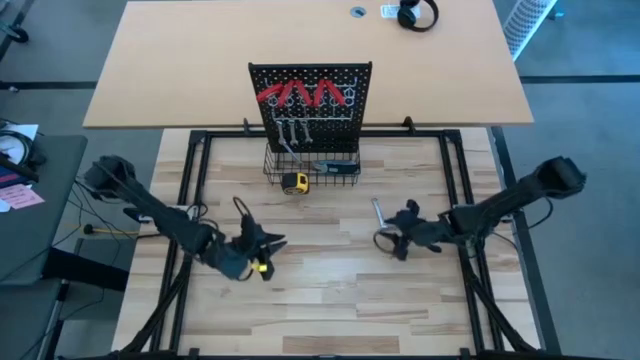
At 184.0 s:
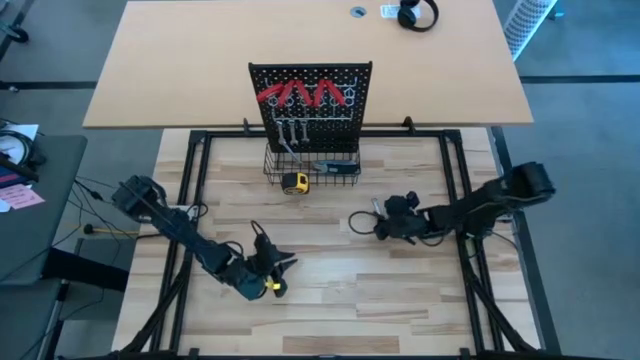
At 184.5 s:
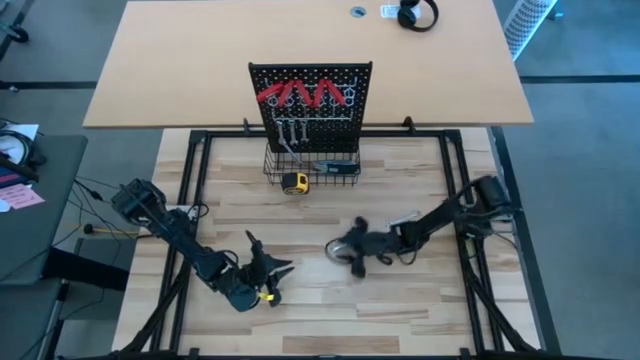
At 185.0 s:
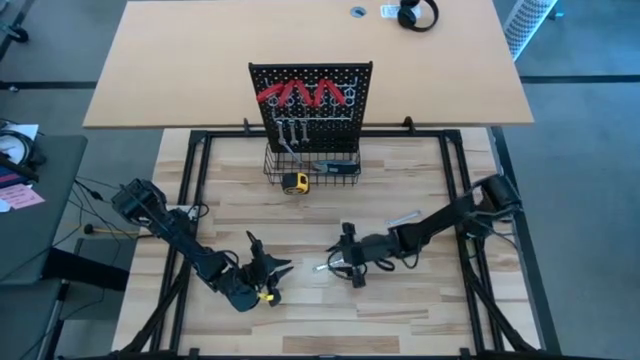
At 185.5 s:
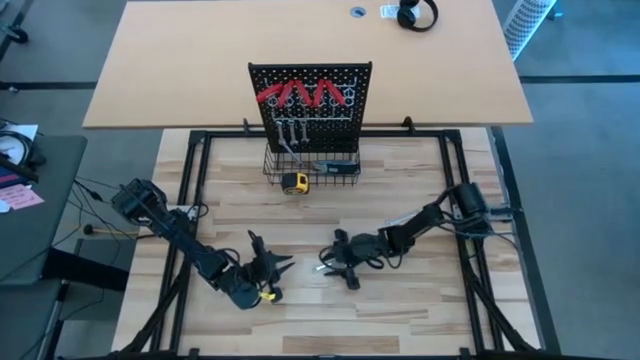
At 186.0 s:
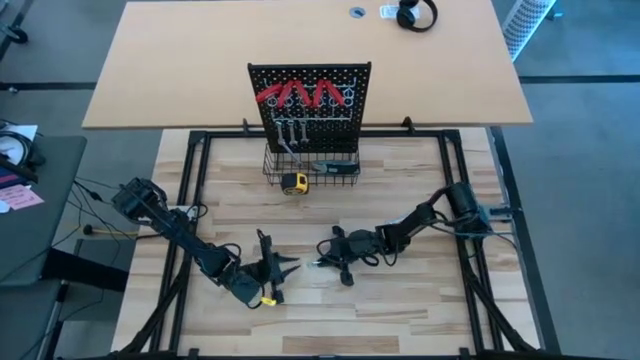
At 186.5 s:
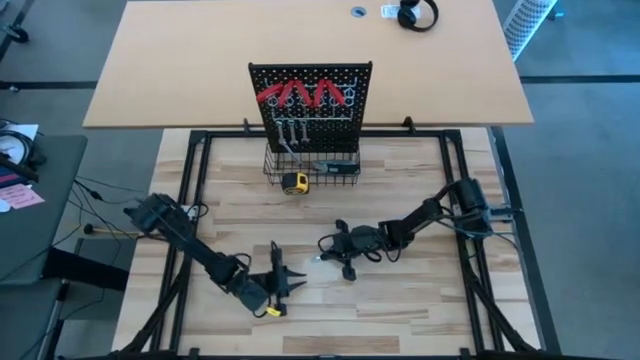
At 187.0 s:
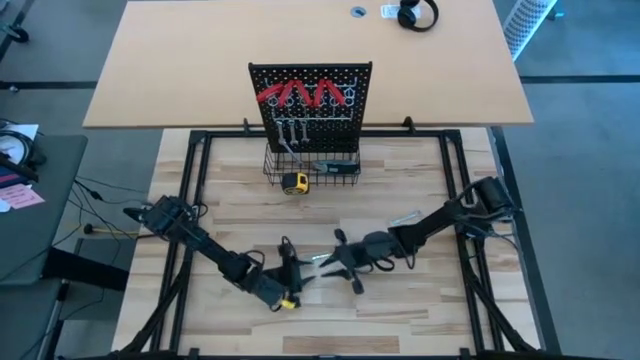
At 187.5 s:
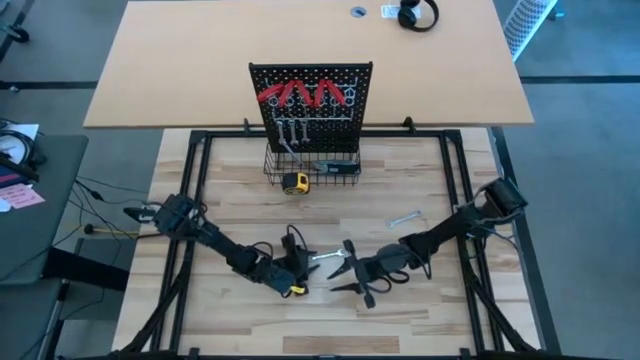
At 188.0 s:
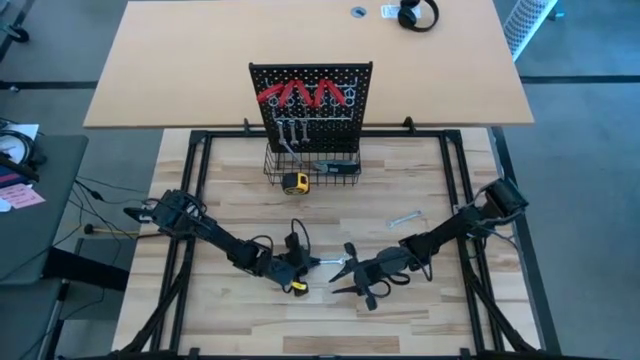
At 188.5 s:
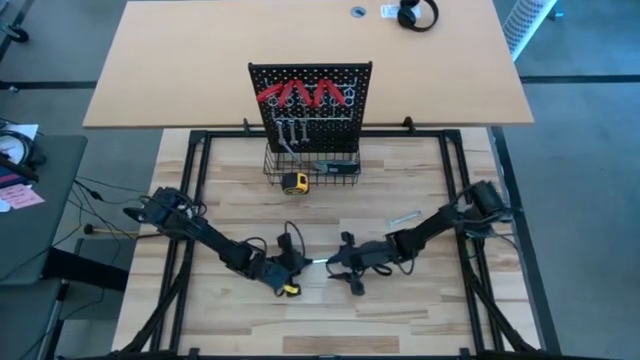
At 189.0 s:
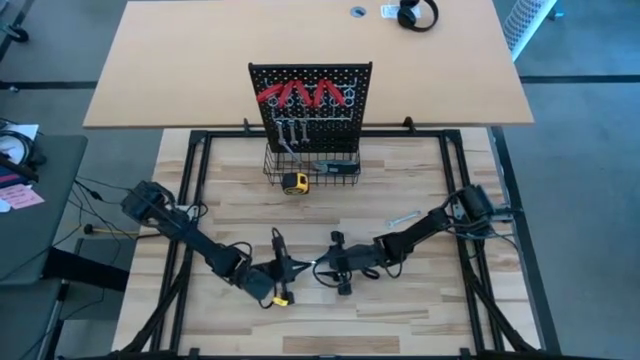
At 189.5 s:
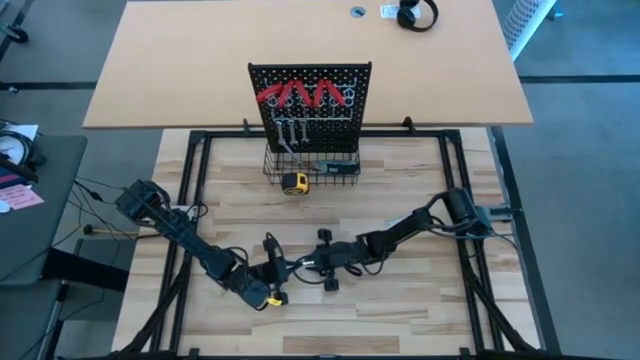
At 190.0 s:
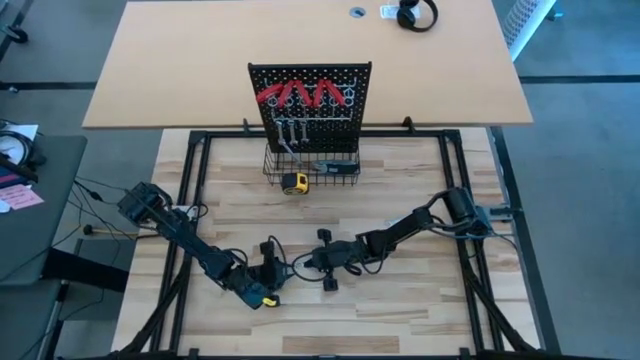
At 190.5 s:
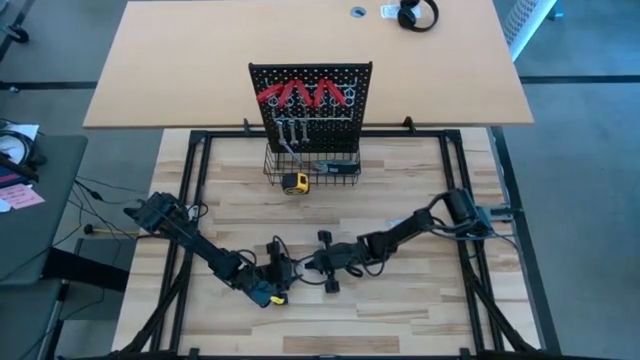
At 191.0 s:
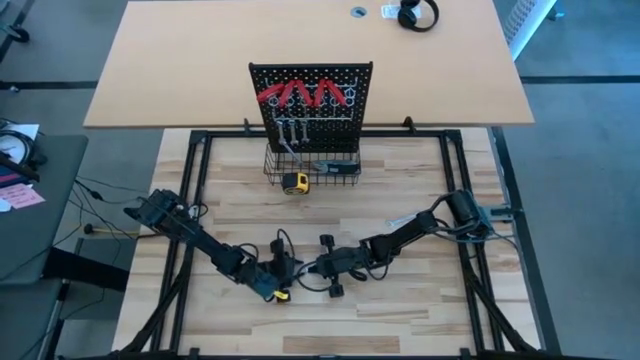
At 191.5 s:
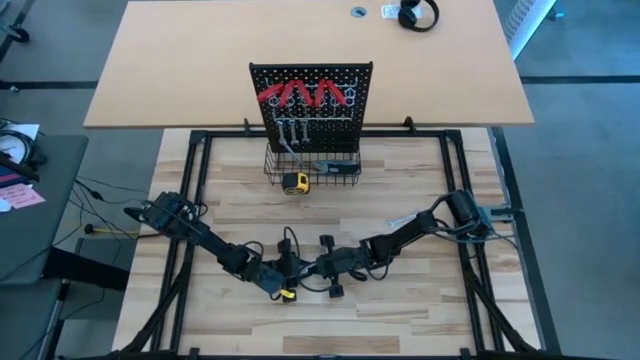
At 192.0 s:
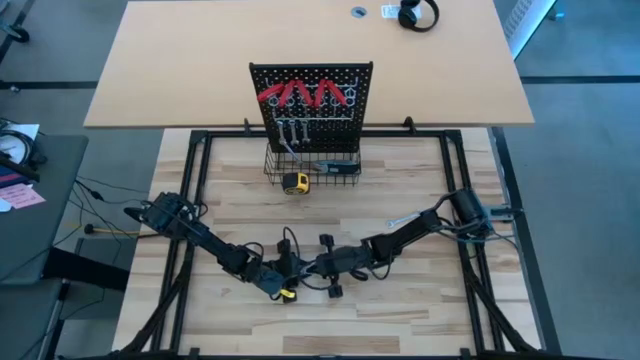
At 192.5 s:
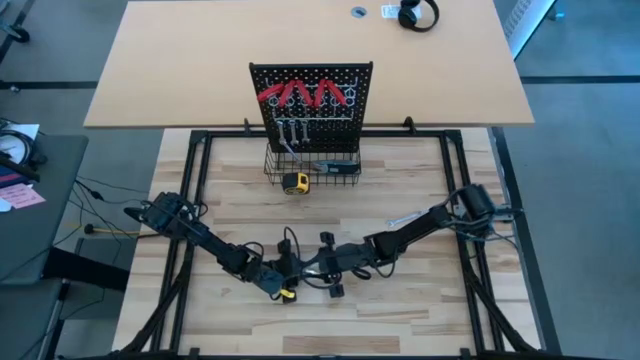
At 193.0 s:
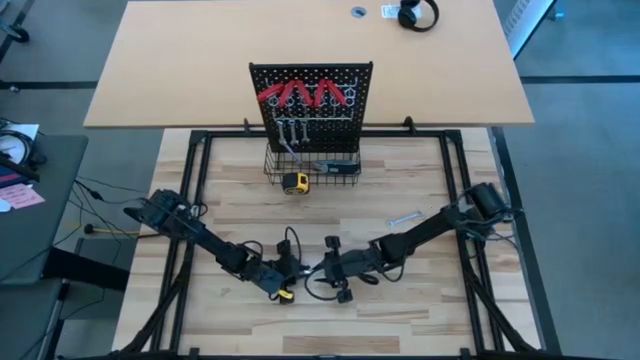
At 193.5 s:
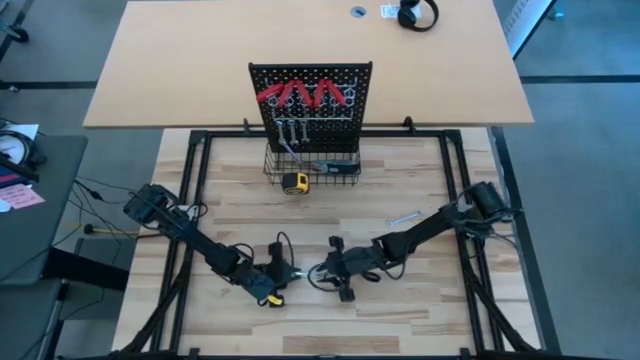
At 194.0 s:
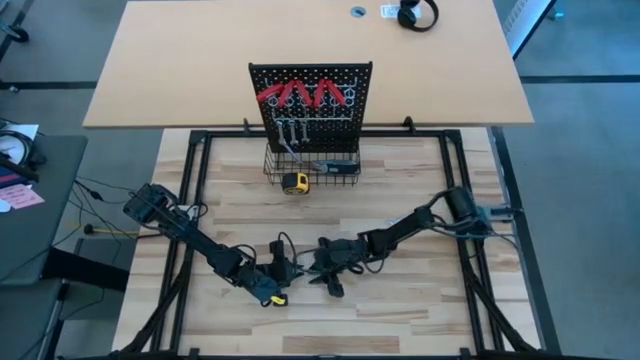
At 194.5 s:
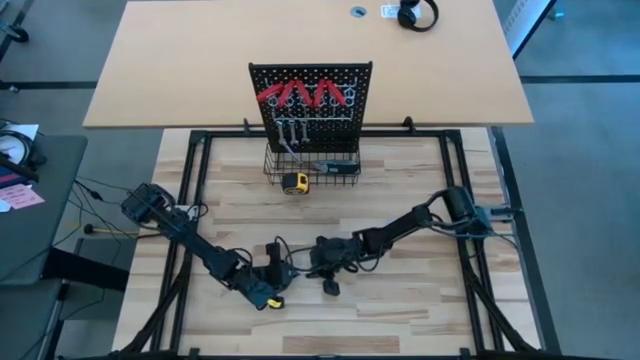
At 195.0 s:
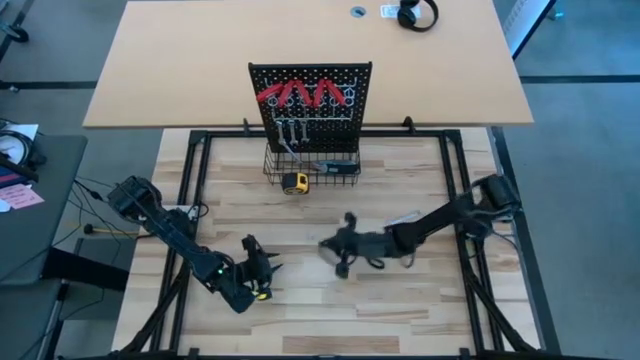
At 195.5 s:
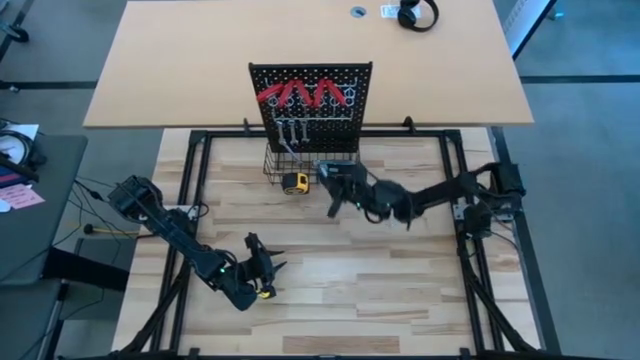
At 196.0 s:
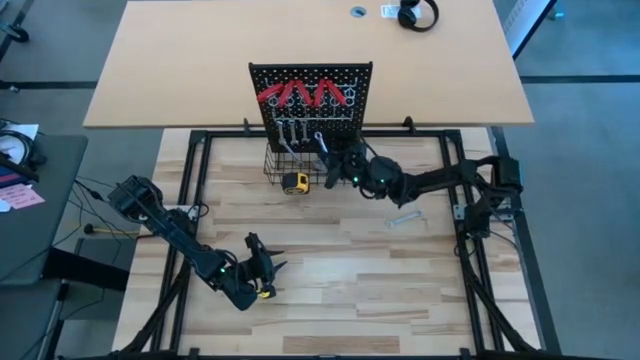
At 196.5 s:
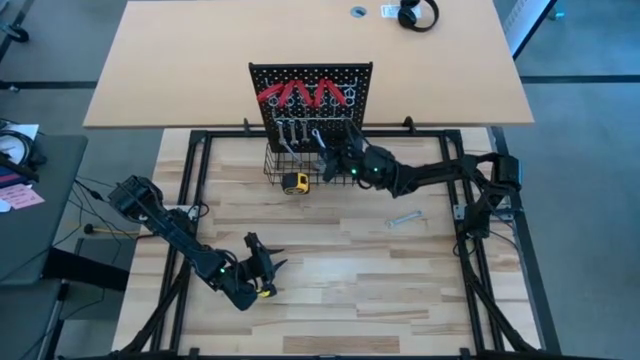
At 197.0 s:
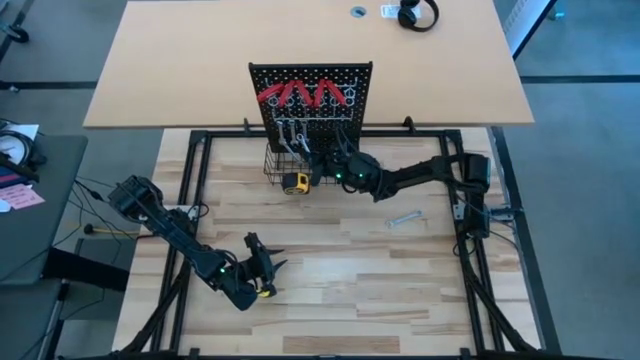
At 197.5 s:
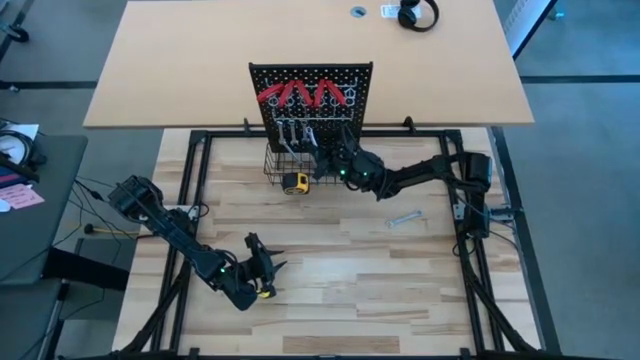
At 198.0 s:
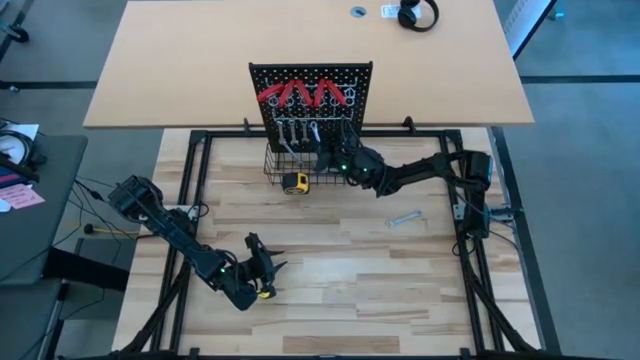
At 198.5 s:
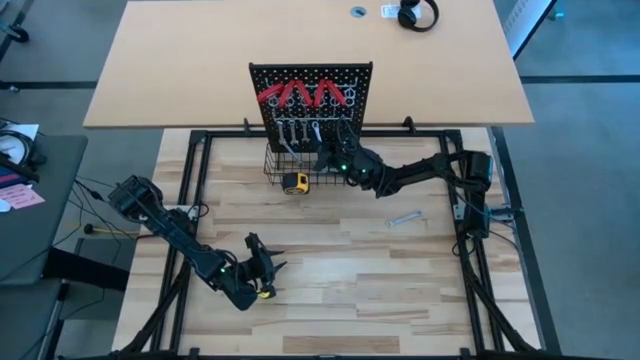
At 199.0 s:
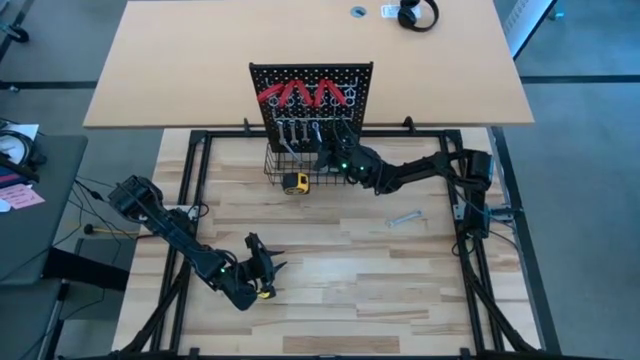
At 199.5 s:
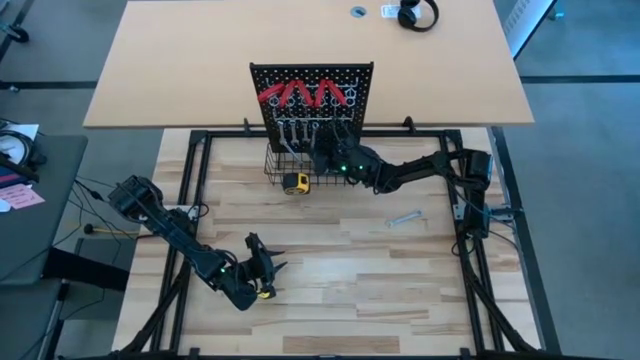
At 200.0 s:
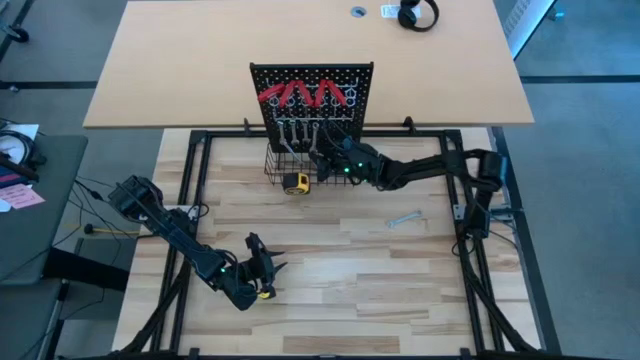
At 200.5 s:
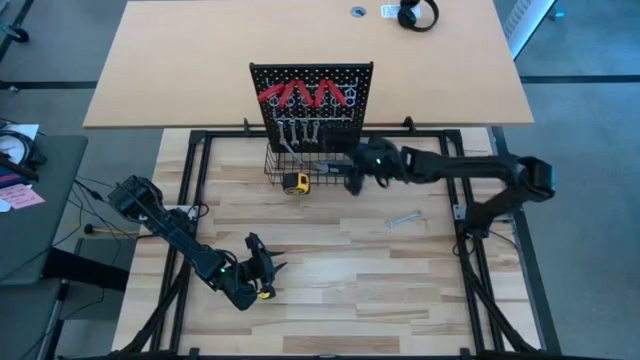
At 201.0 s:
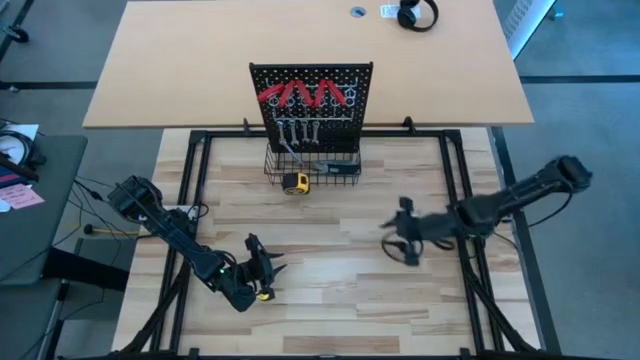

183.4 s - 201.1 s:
Task: Hang tools onto peg board
Hang the wrench into the pegboard
